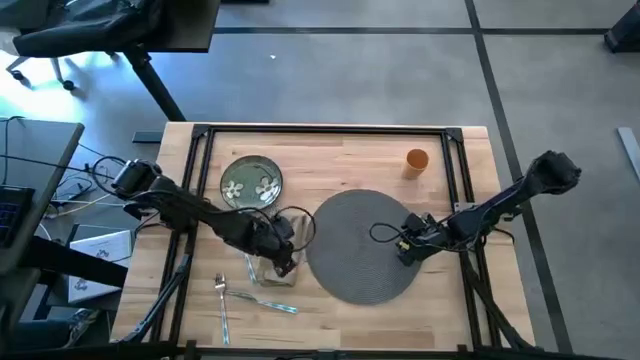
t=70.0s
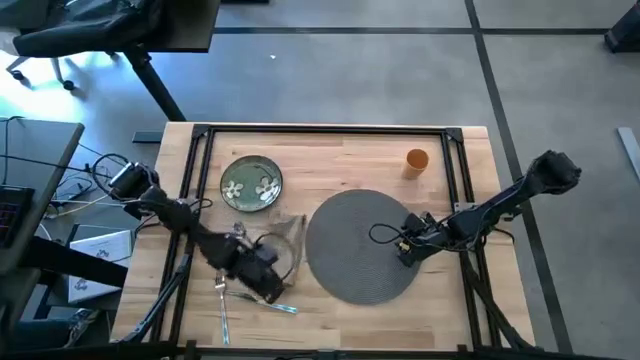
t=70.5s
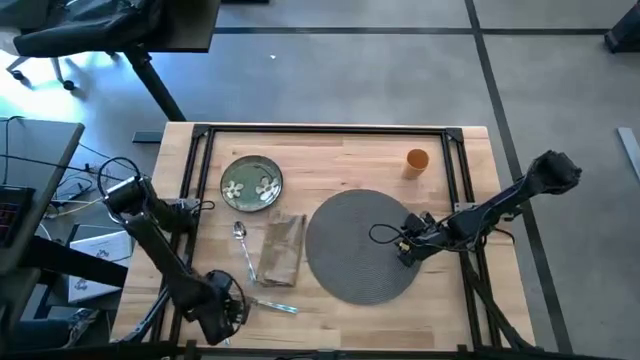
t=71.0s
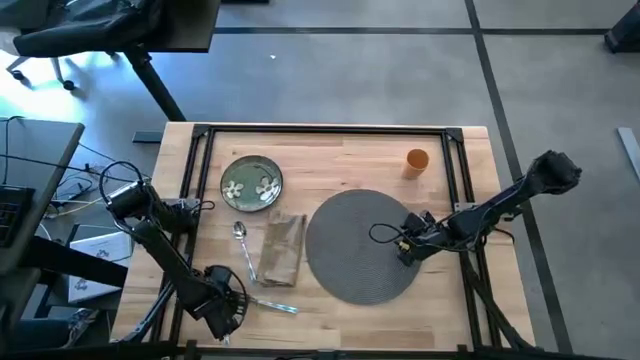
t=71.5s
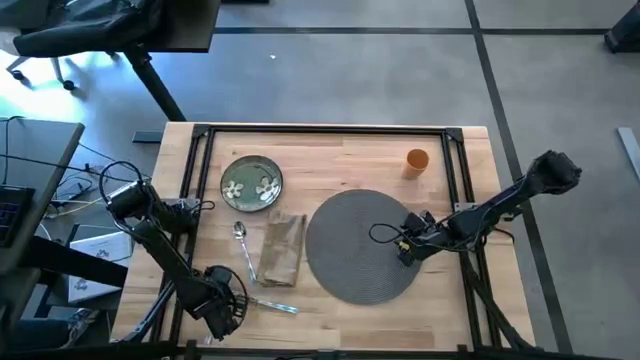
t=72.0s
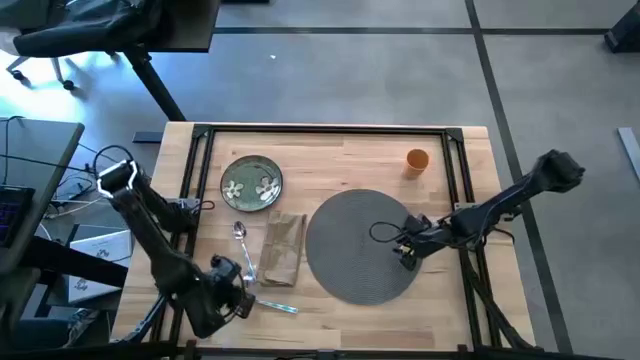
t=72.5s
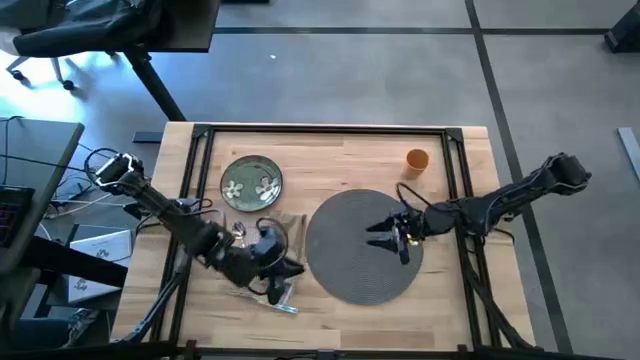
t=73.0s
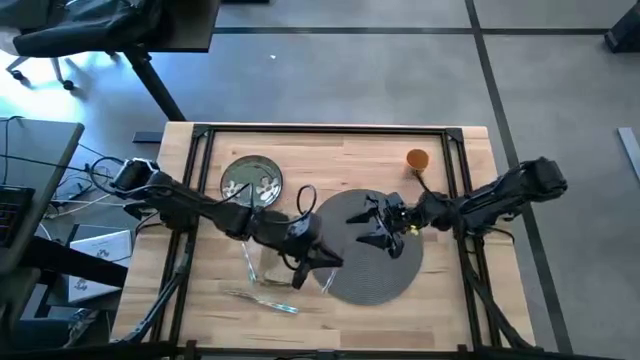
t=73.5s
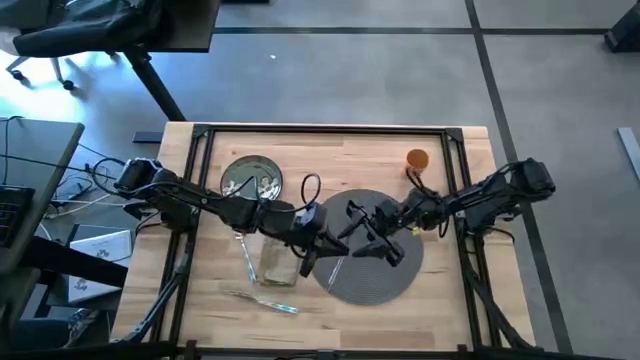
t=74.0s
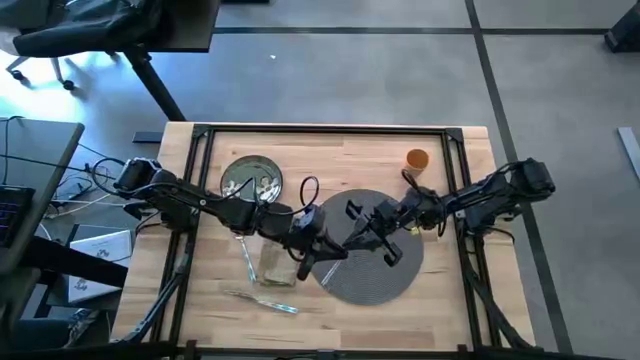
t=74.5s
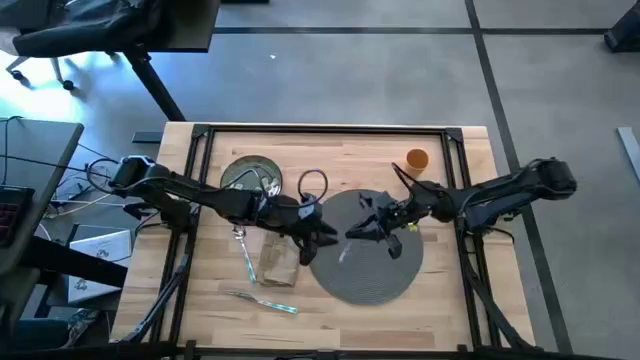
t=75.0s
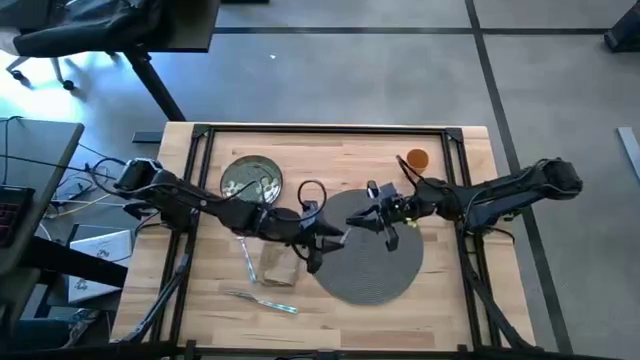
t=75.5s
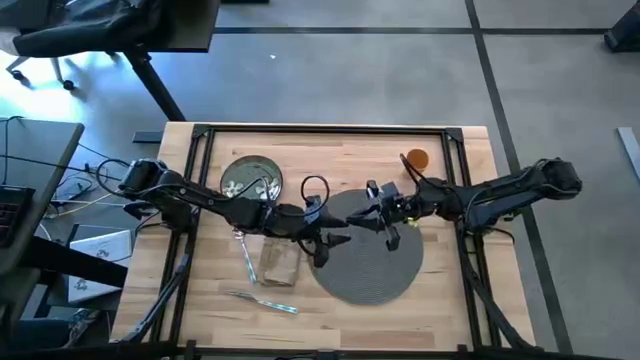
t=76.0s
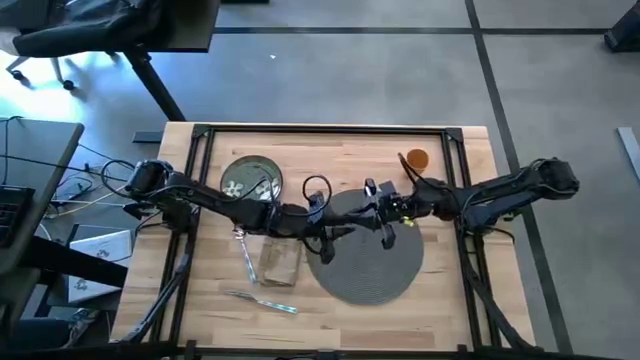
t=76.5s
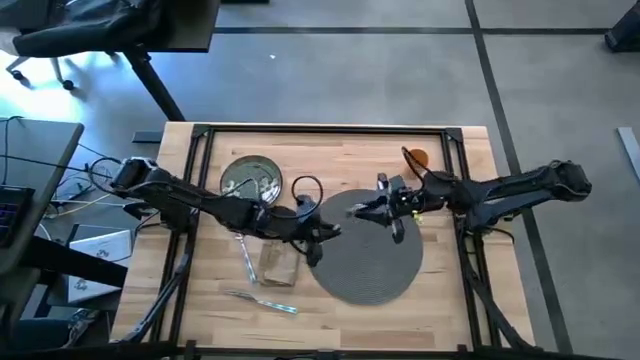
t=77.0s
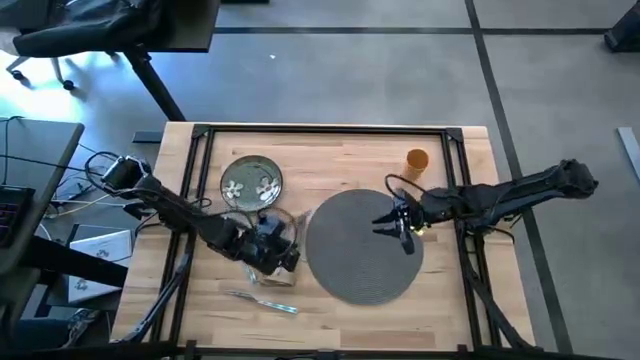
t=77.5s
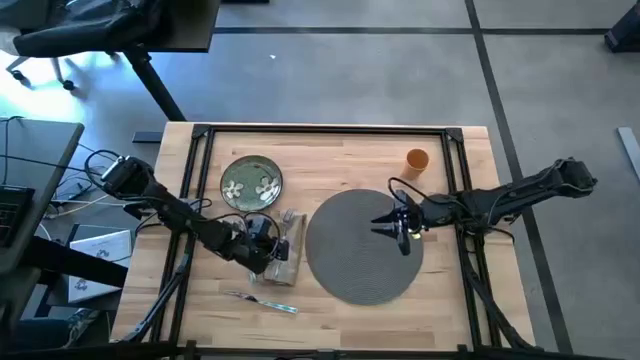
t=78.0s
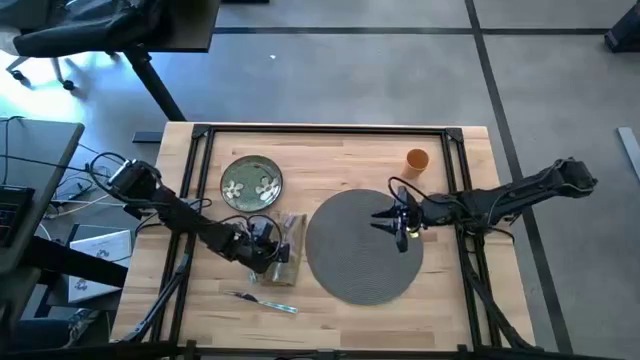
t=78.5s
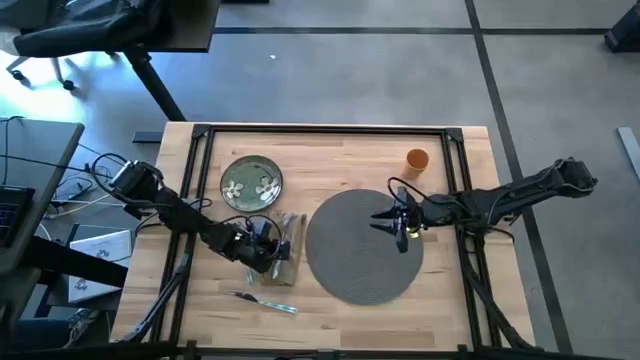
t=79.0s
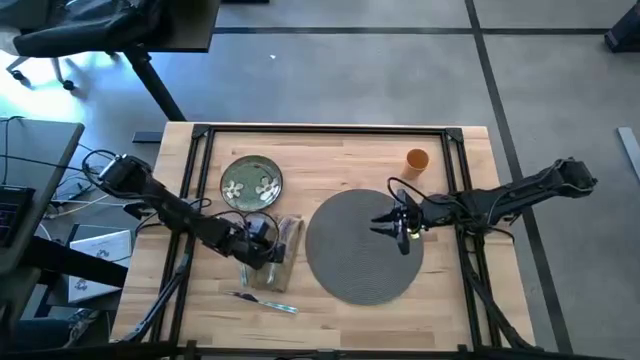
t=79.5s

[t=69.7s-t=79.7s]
Task: Set table place
Put the blue fork on top of the brown table napkin

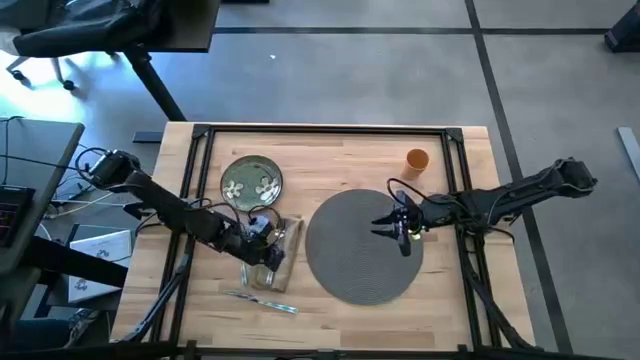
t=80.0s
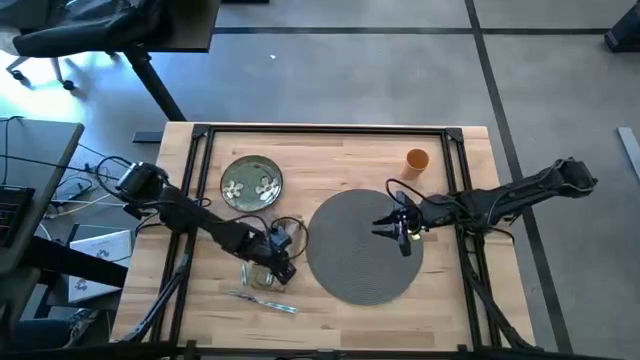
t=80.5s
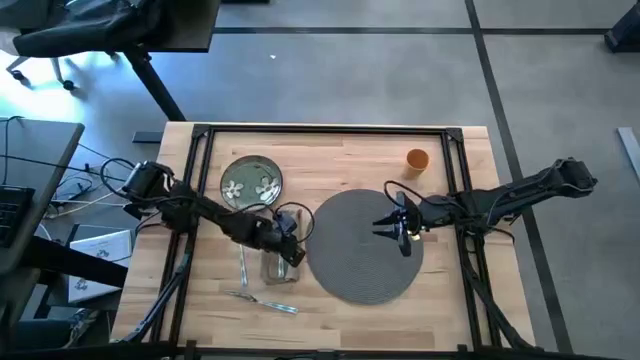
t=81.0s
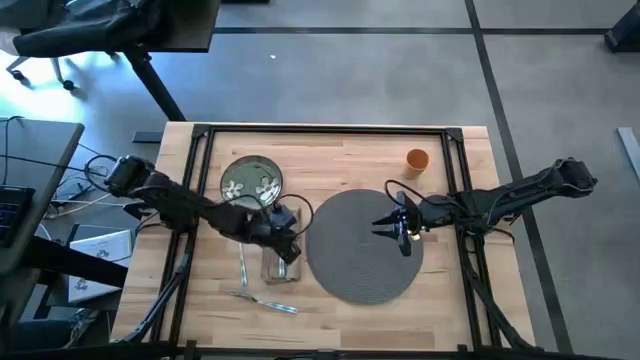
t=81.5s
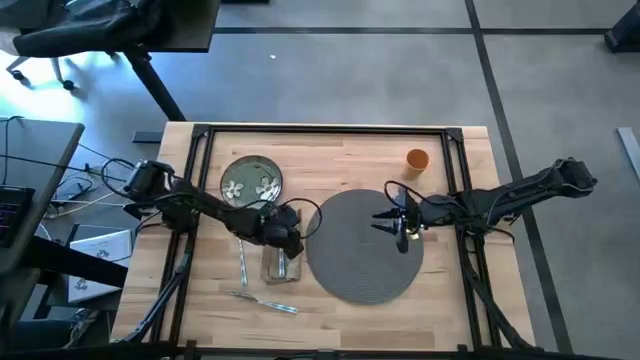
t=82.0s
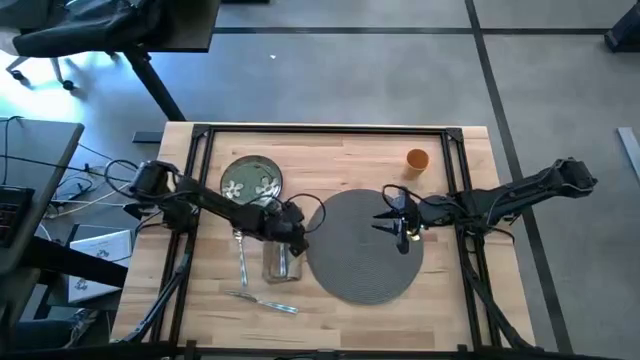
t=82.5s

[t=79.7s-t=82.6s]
Adjust the brown table napkin

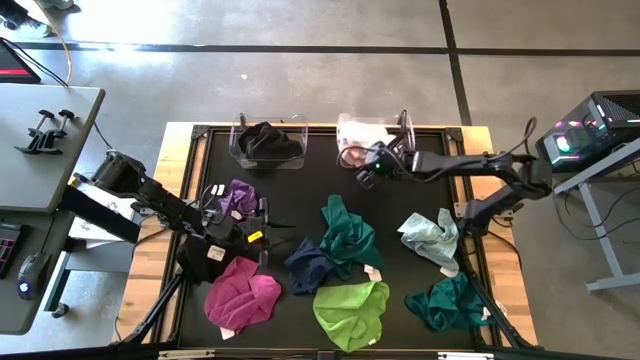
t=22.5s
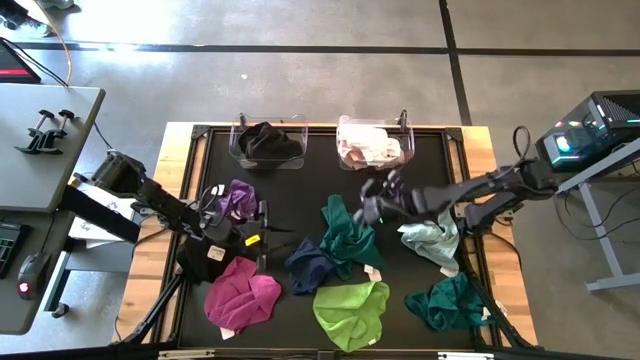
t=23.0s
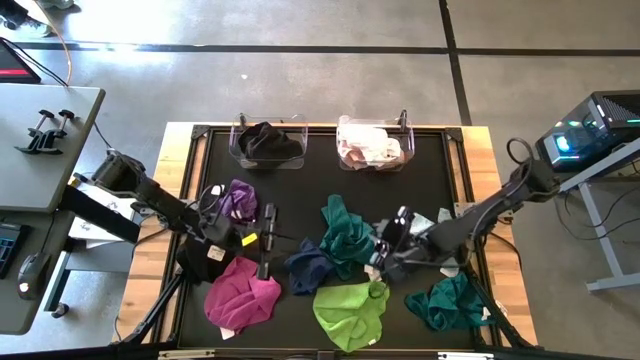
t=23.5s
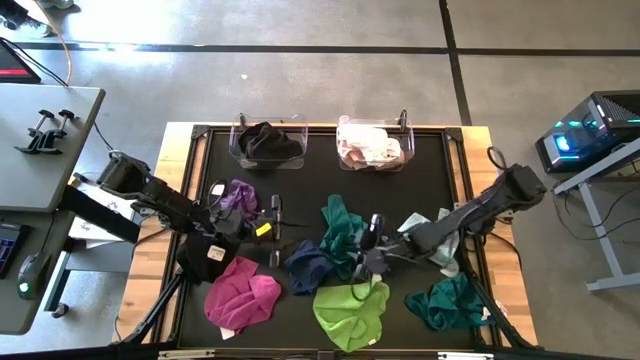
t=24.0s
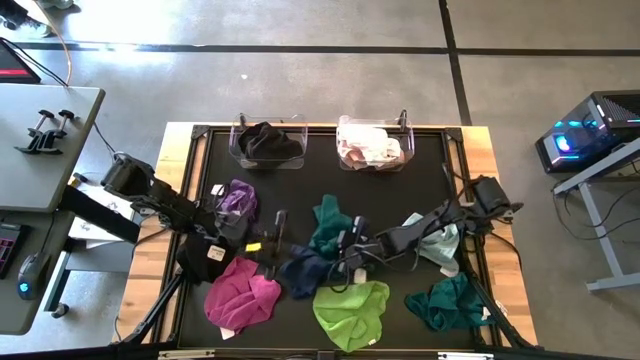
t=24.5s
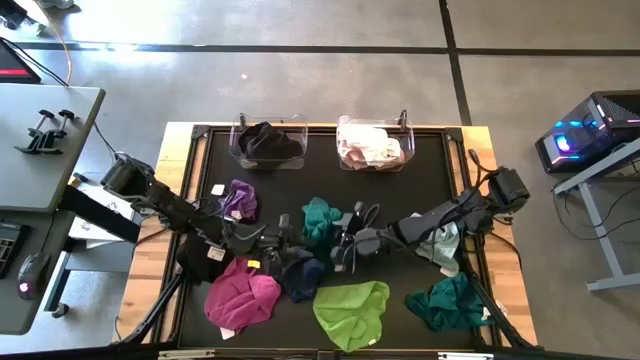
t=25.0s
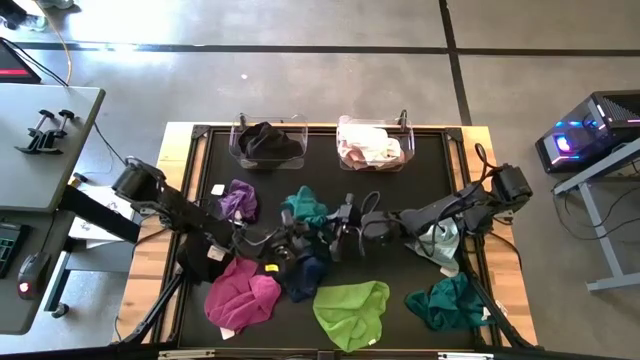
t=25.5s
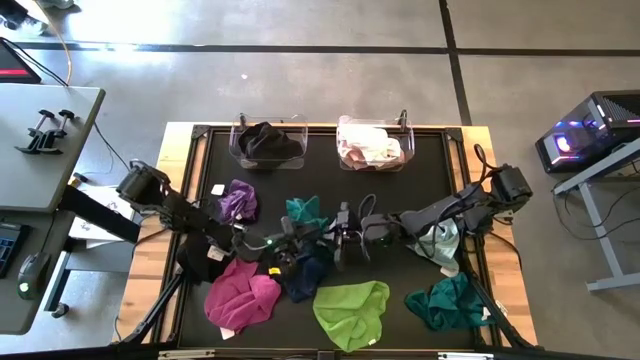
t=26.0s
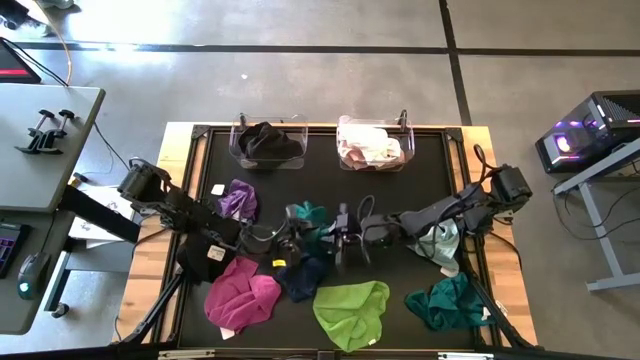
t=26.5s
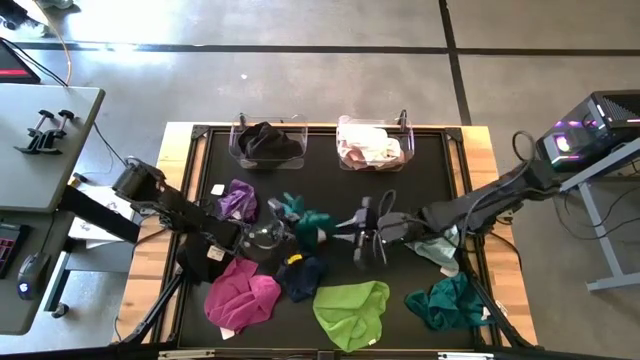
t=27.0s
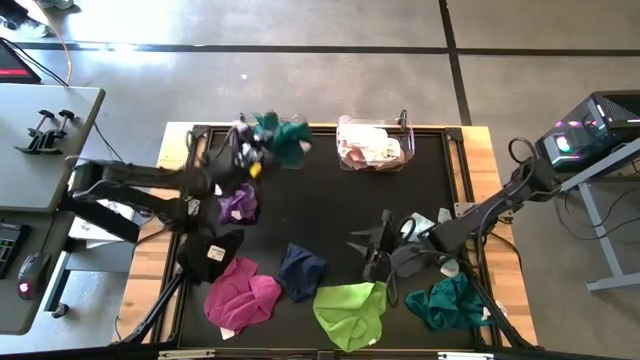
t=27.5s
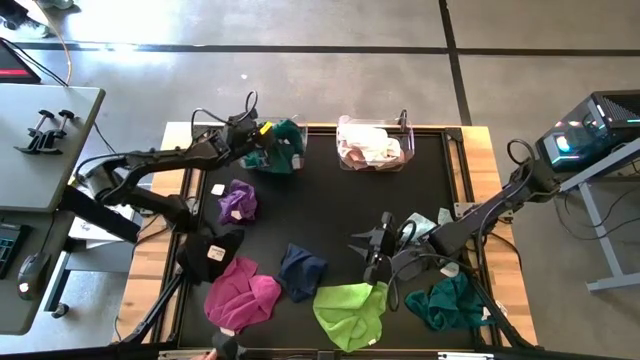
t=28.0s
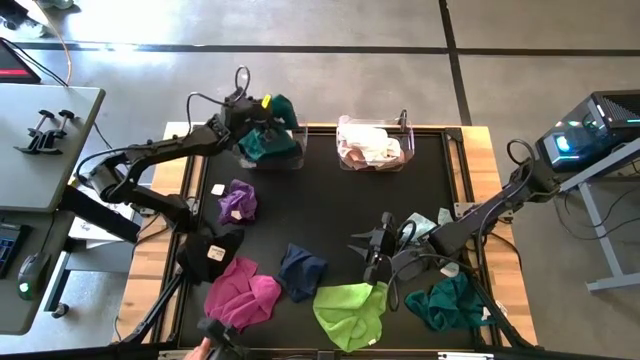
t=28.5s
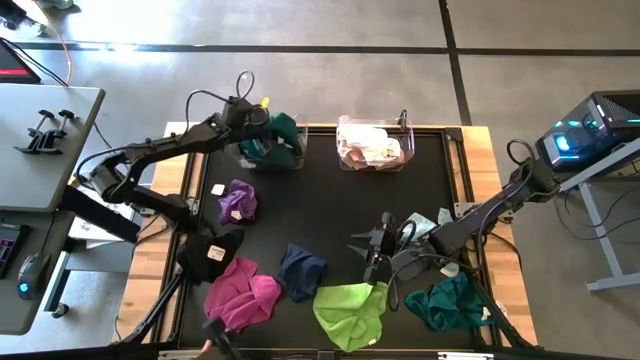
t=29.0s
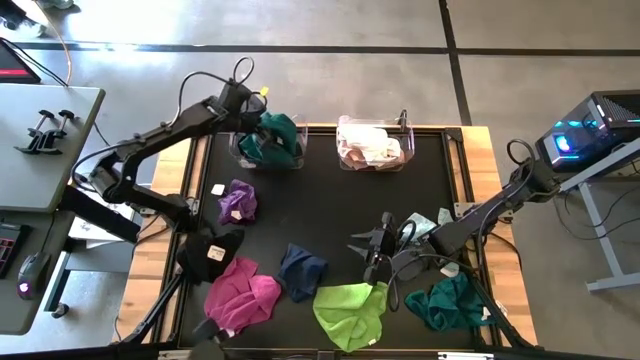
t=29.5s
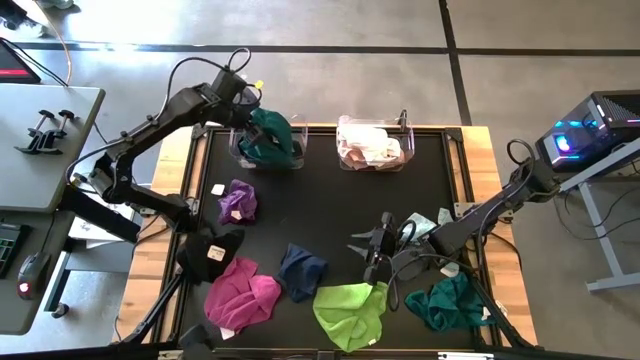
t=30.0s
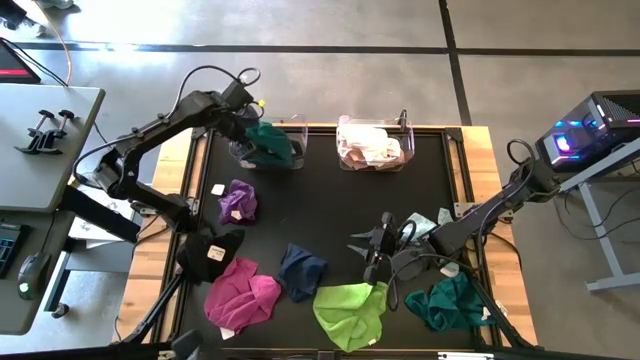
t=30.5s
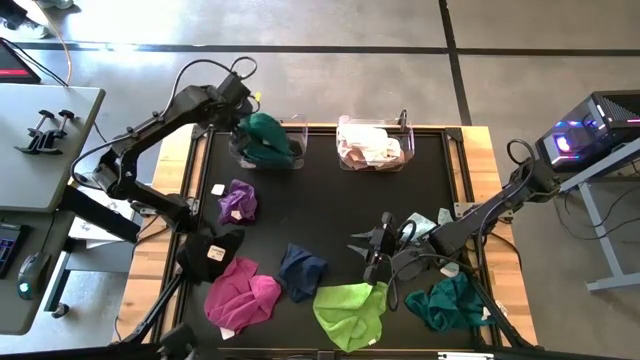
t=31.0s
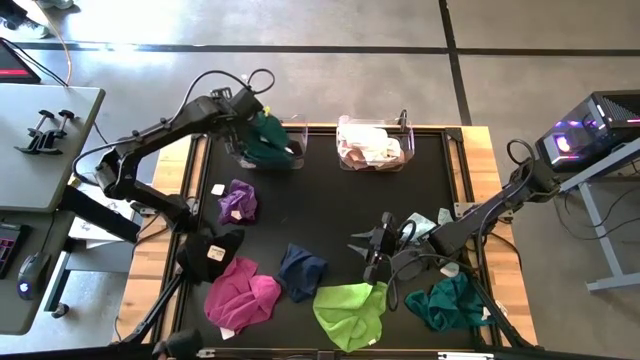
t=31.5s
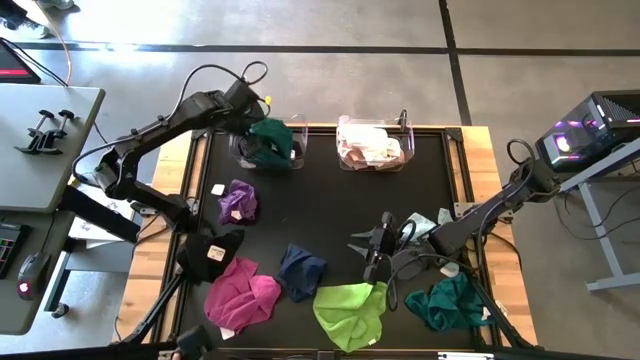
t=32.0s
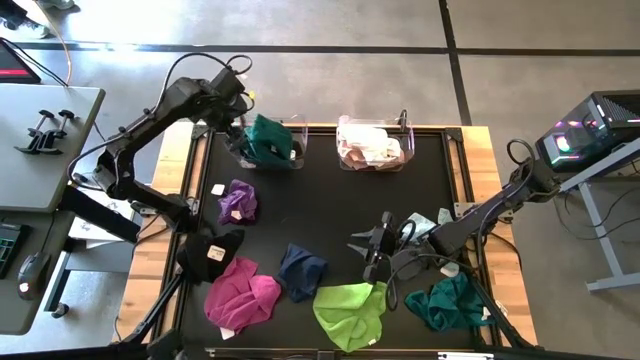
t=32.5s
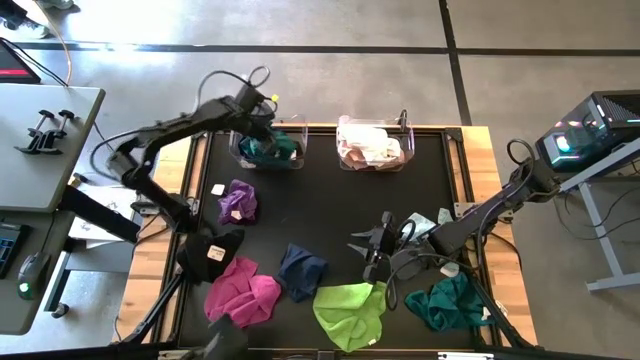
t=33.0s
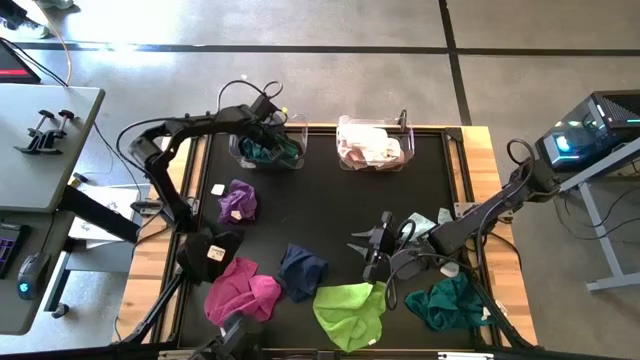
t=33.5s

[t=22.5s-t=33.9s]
Task: Sort towels by color in basket
Put the top green microfiber towel into the left transparent bin
